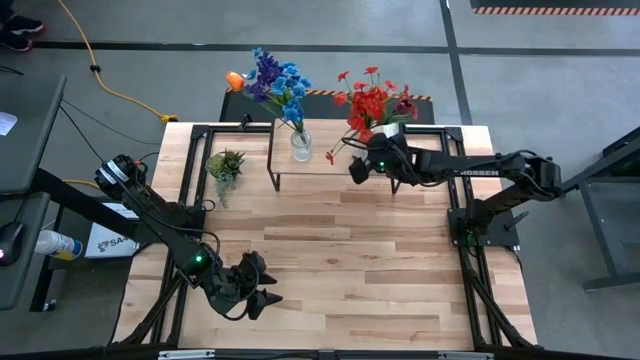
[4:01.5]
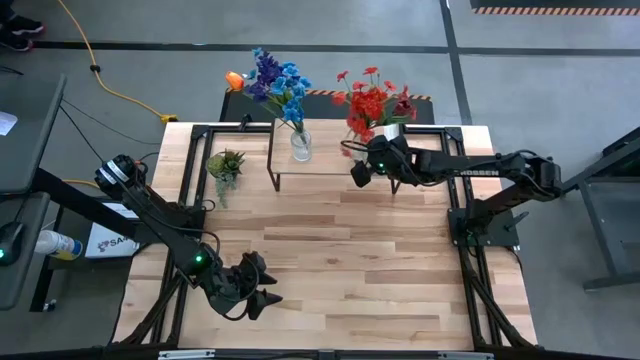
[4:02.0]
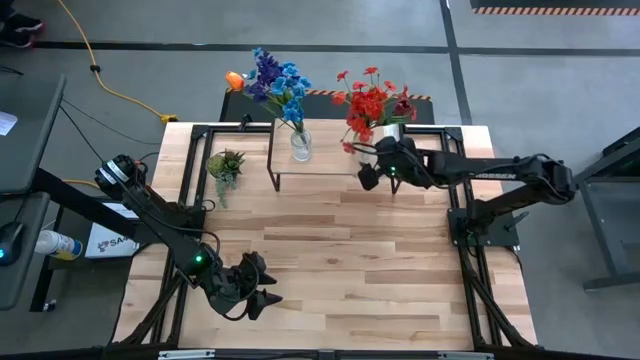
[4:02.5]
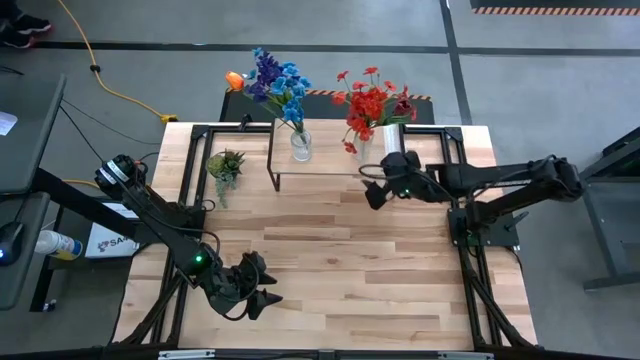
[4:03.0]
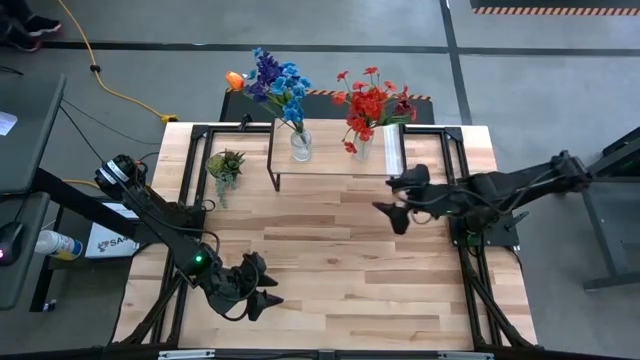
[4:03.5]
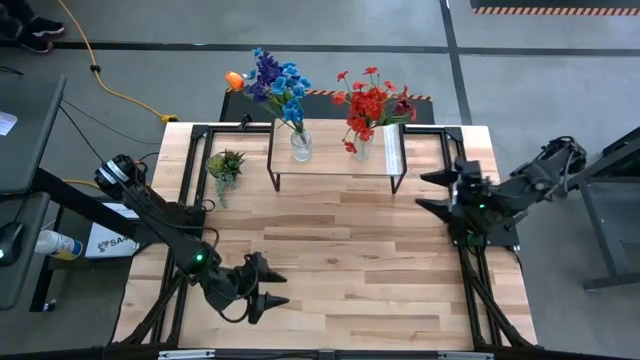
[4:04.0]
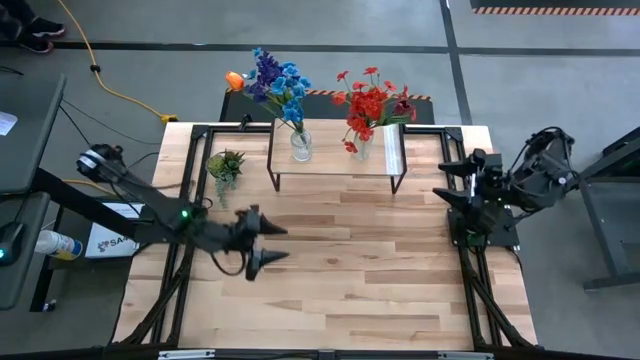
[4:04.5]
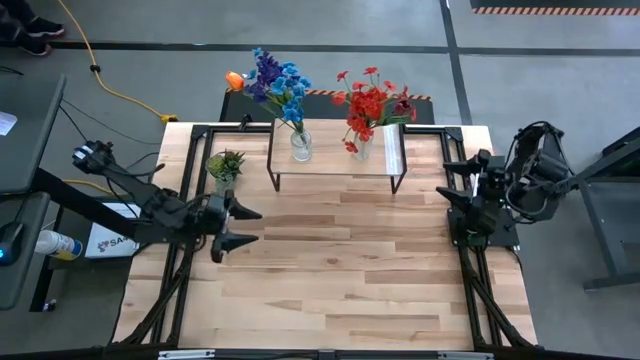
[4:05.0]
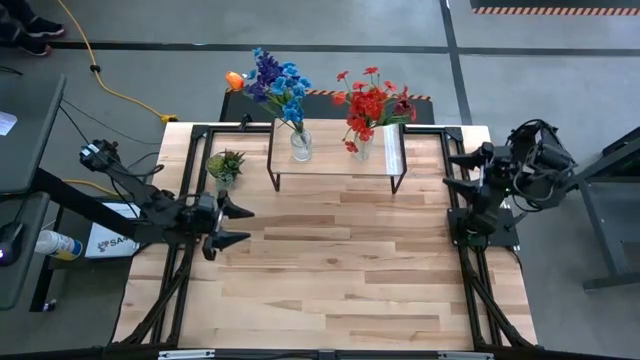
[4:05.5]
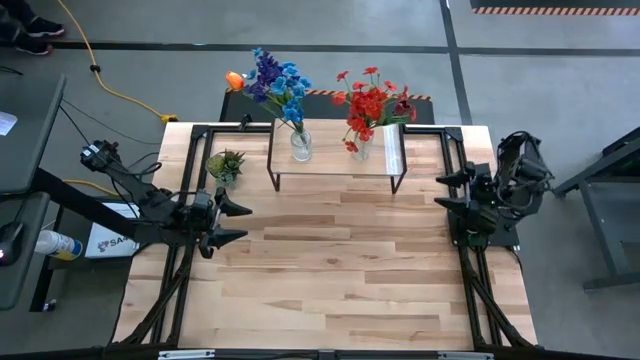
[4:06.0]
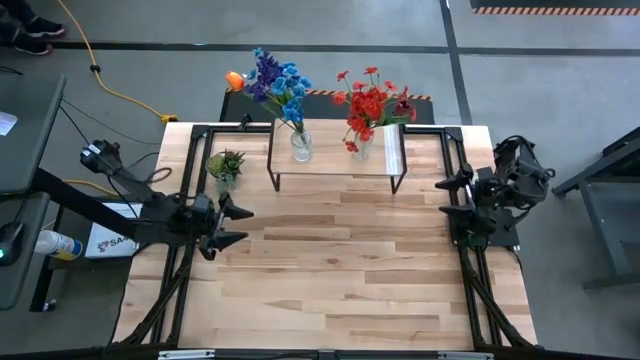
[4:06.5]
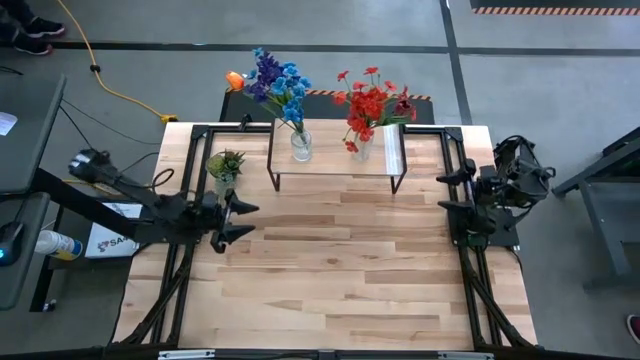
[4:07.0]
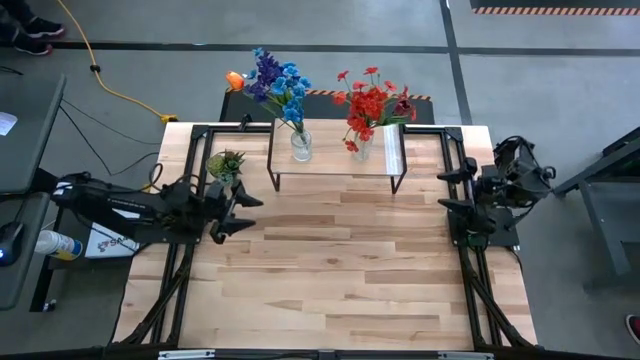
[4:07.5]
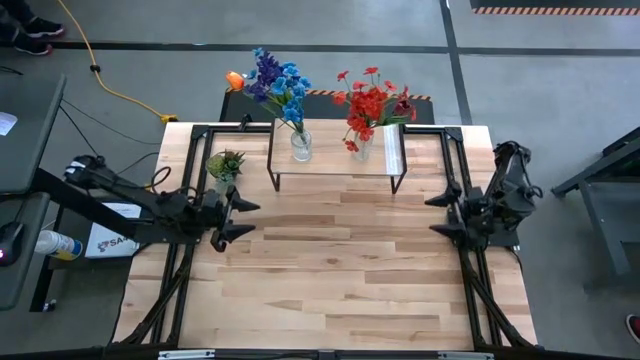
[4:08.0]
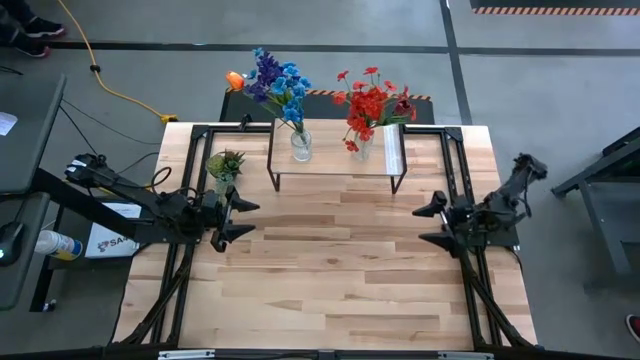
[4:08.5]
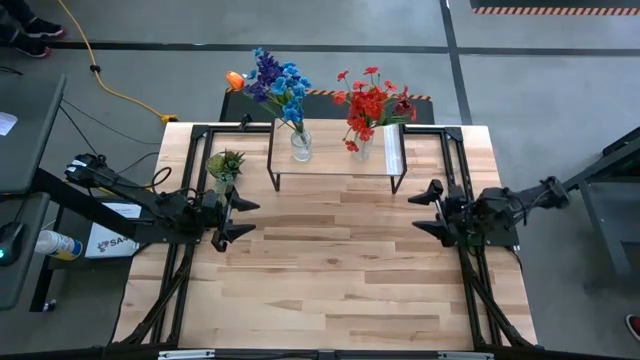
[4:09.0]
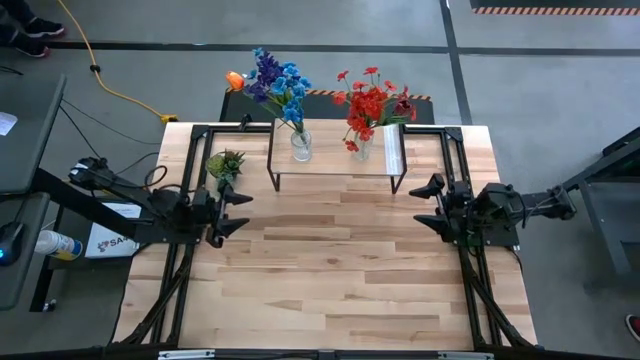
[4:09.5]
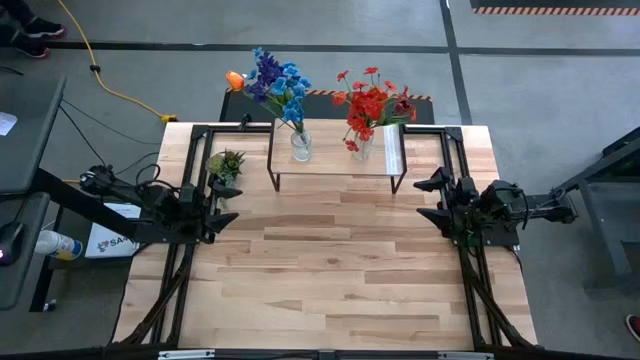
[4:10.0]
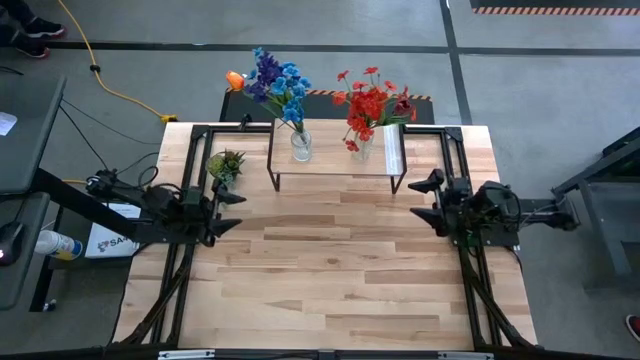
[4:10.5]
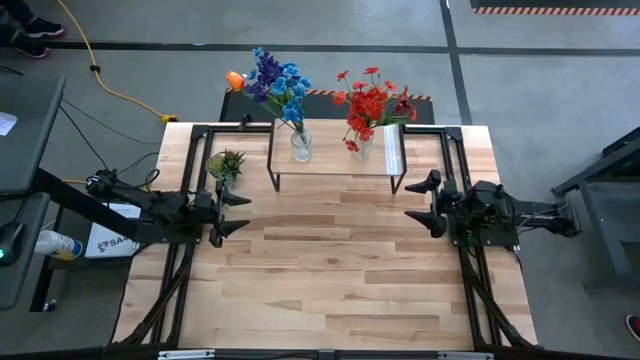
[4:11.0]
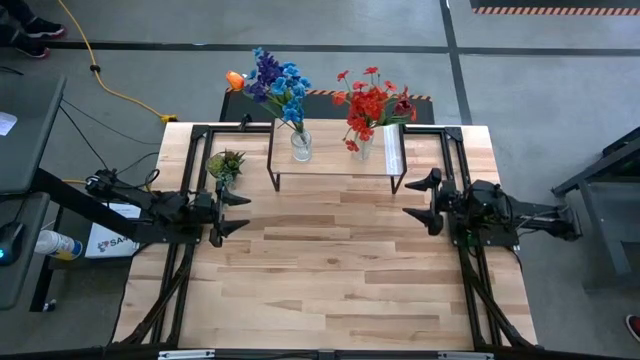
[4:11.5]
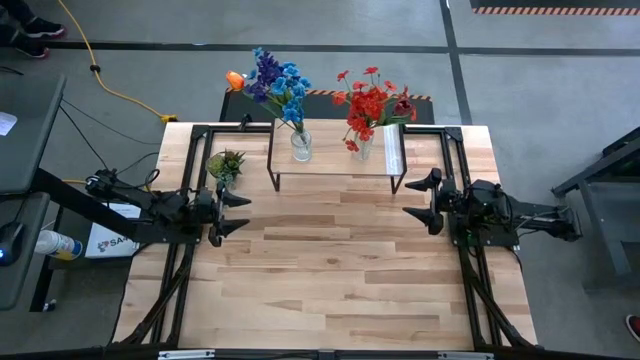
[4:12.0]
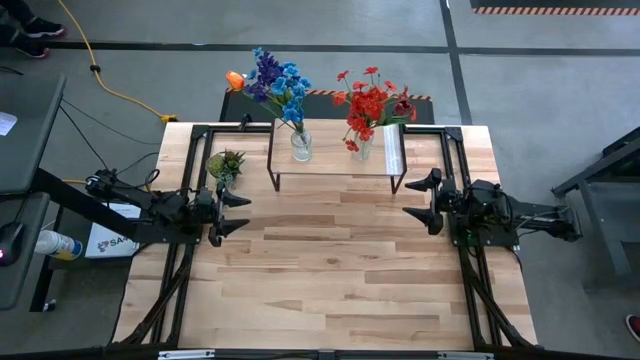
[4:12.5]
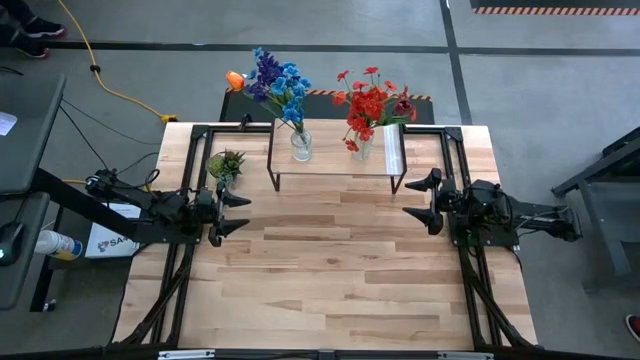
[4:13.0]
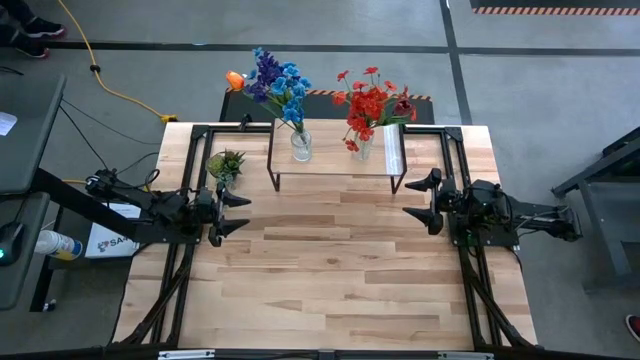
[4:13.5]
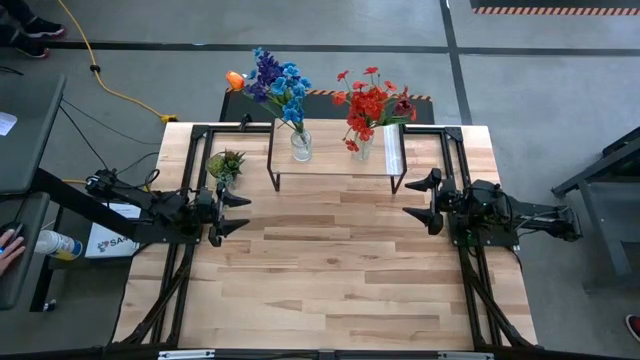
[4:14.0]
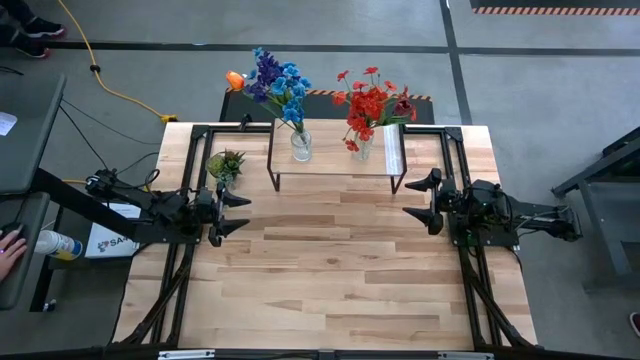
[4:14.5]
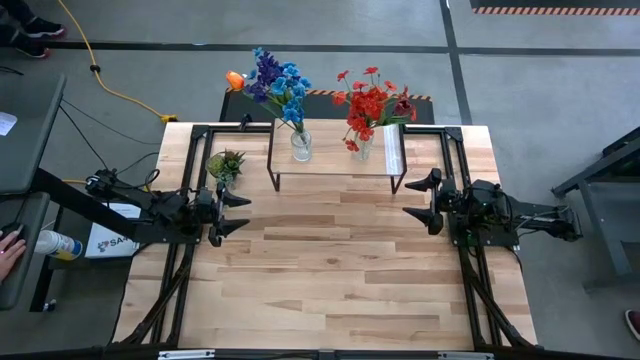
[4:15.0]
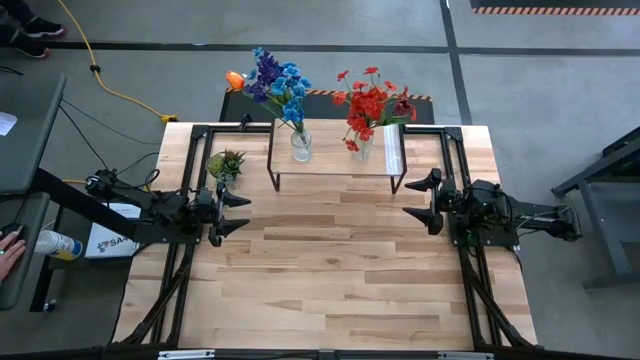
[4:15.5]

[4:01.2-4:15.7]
Task: Pick and place flowers into a vace then onto a shelf
Return to Home Position

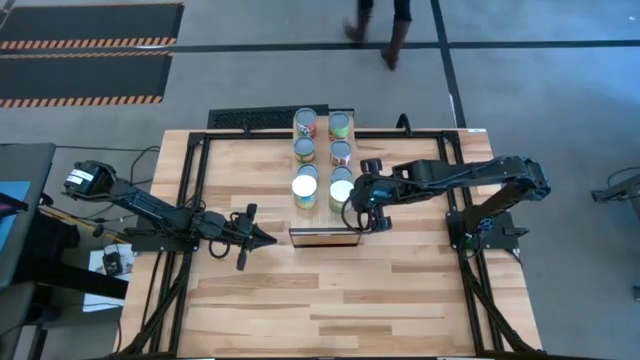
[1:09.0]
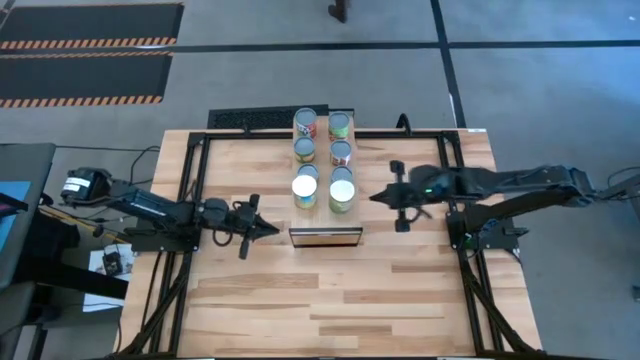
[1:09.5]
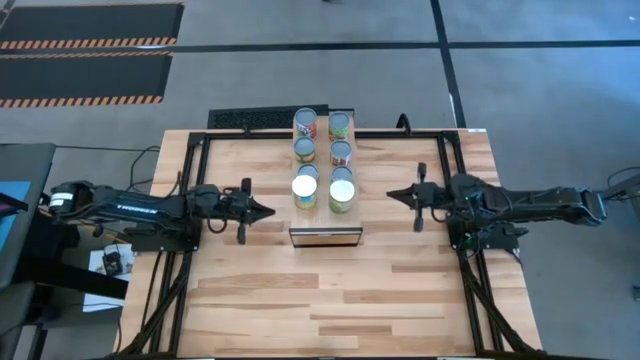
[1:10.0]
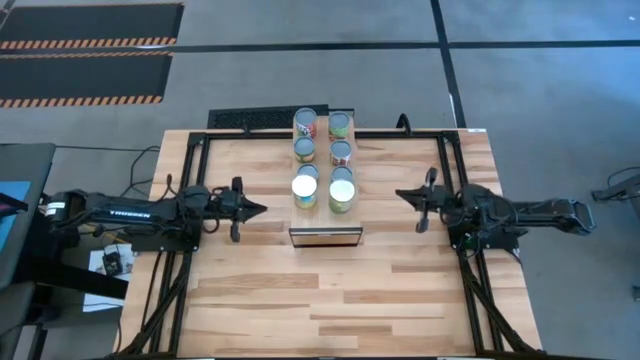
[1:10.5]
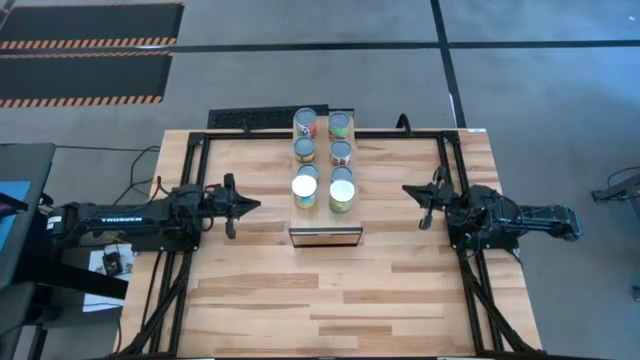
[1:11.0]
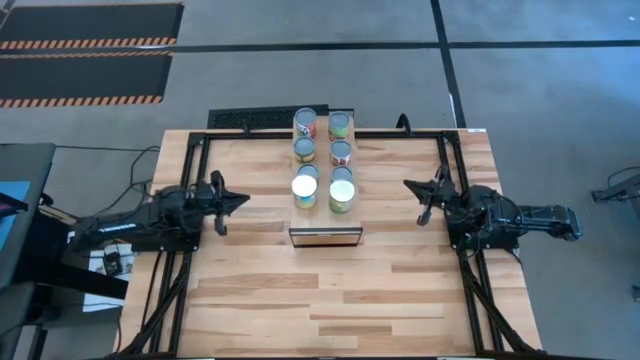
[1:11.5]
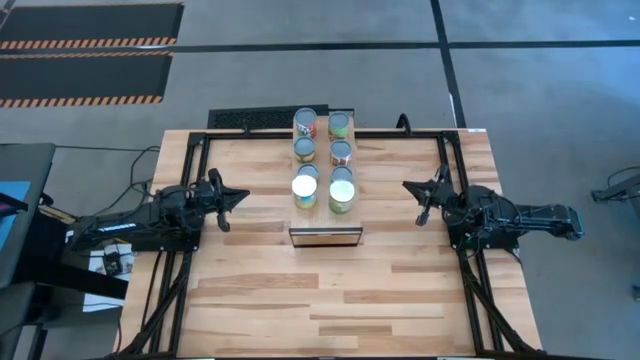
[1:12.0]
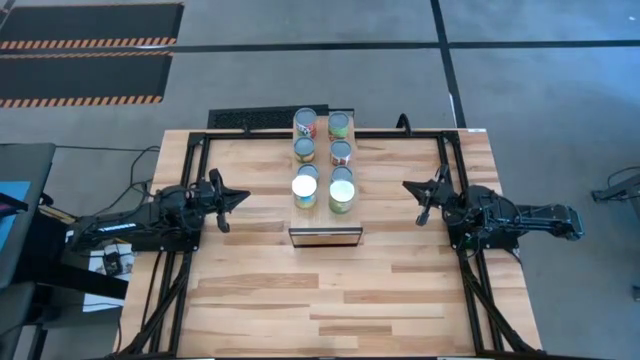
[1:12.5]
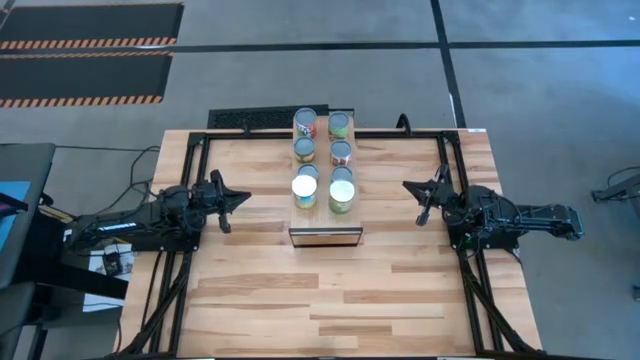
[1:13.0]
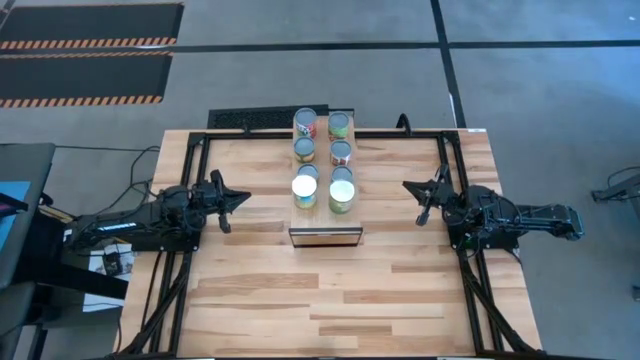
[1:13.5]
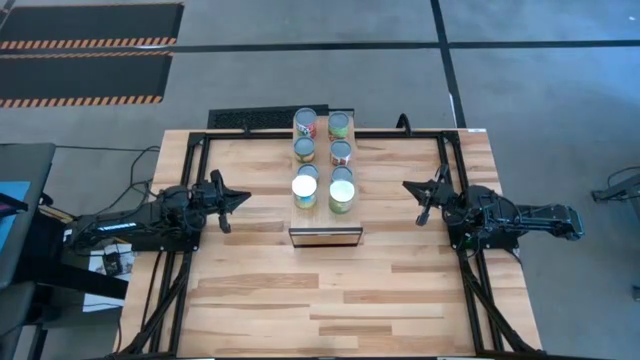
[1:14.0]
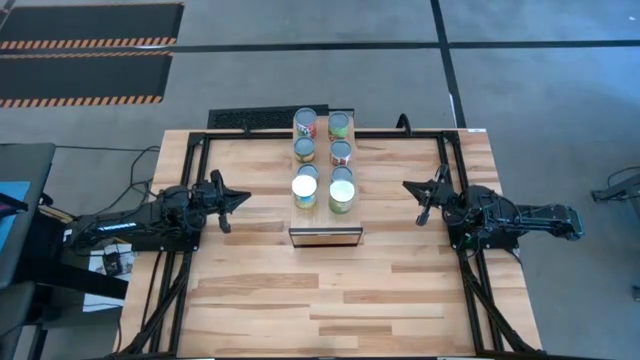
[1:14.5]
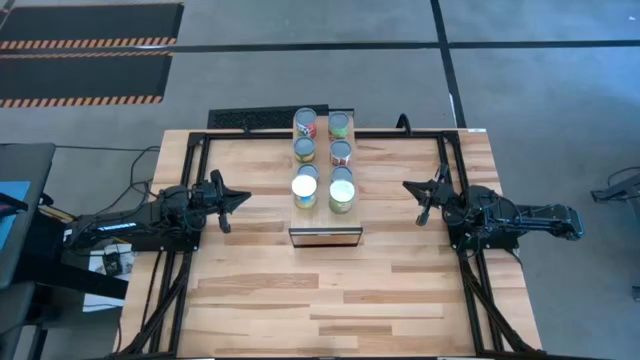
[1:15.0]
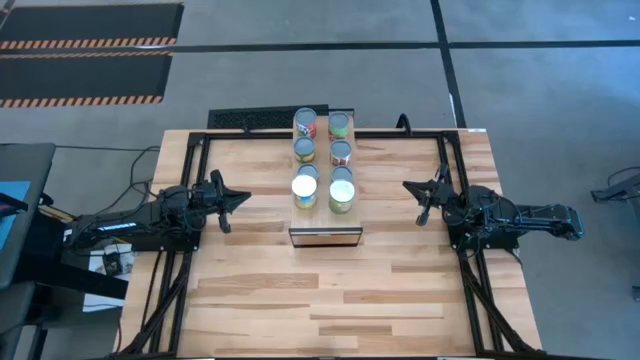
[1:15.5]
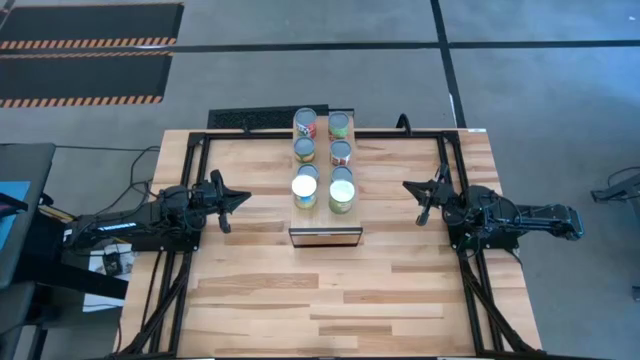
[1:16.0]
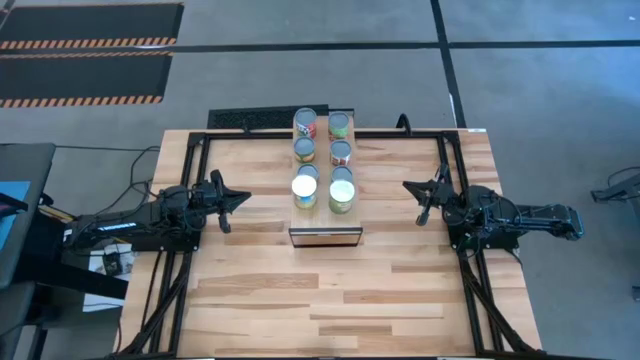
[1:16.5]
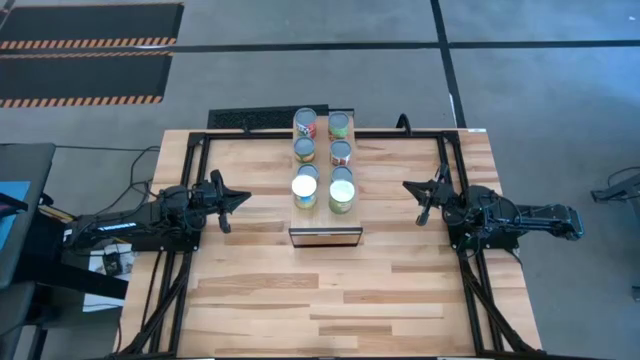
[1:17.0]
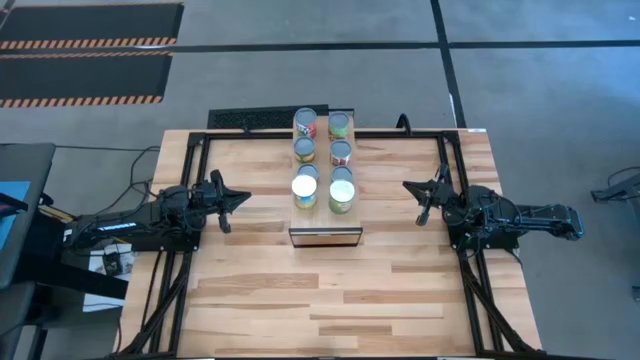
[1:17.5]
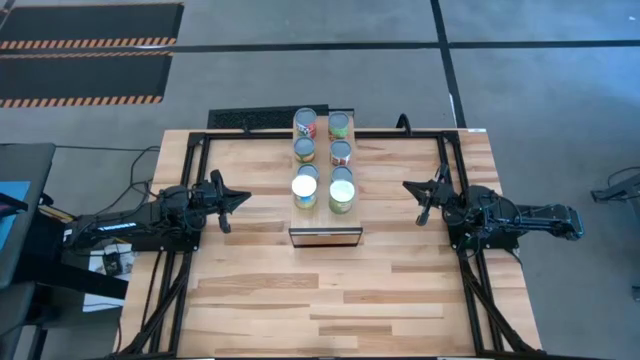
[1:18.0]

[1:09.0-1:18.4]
Task: Pick and place cans onto a shelf
Return to Home Position
